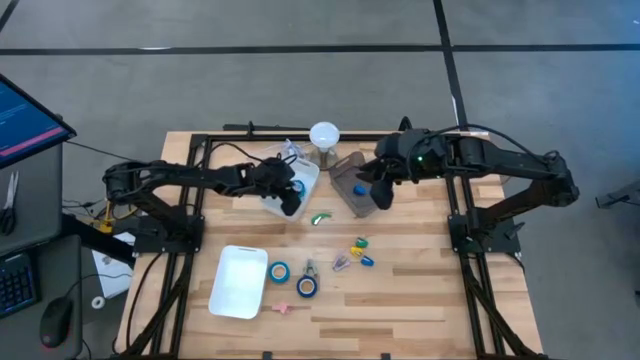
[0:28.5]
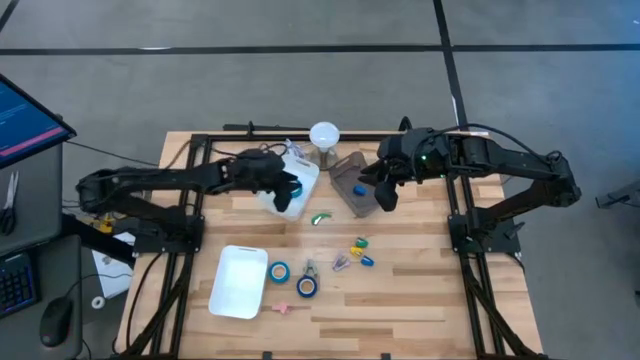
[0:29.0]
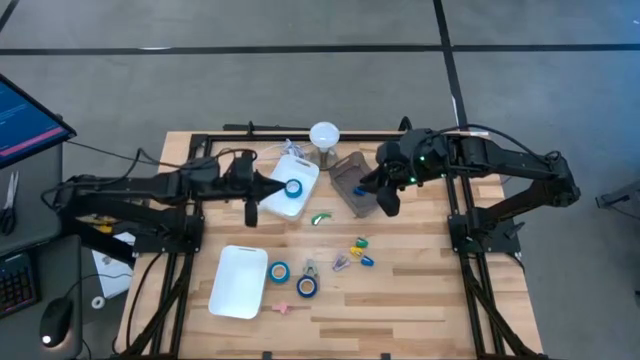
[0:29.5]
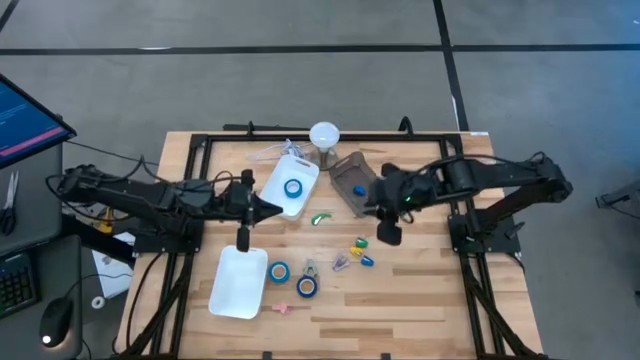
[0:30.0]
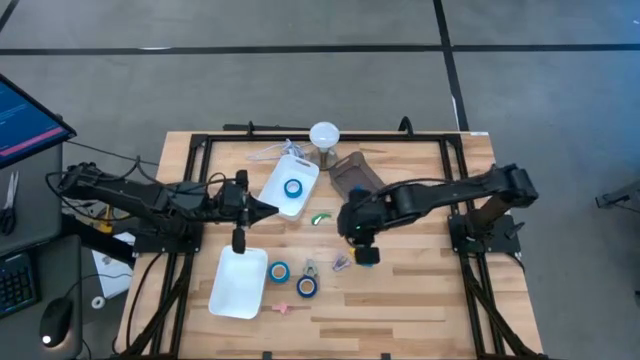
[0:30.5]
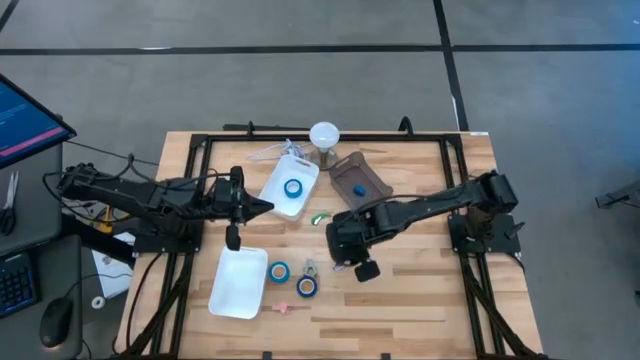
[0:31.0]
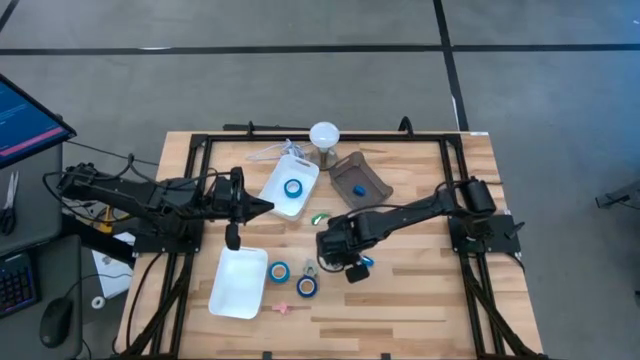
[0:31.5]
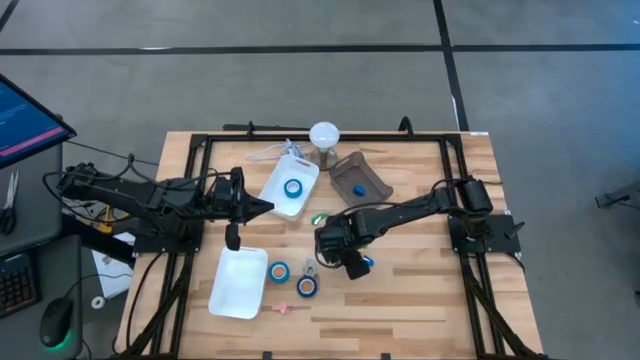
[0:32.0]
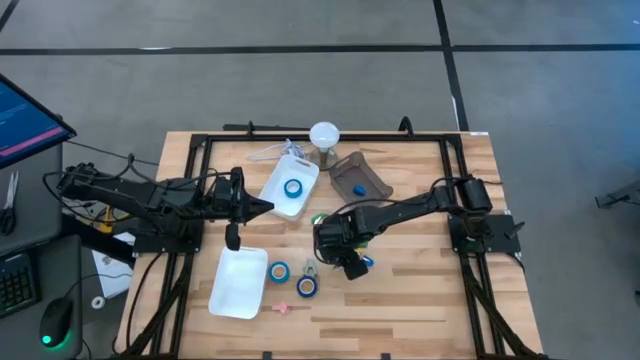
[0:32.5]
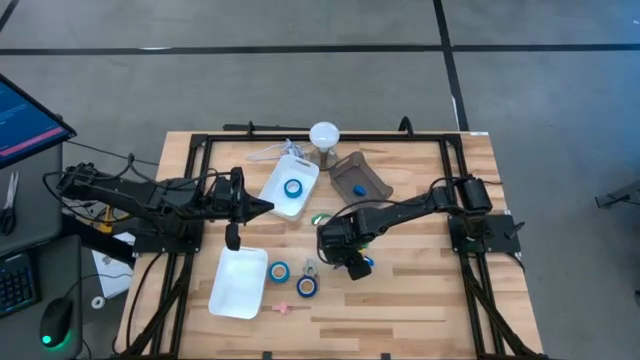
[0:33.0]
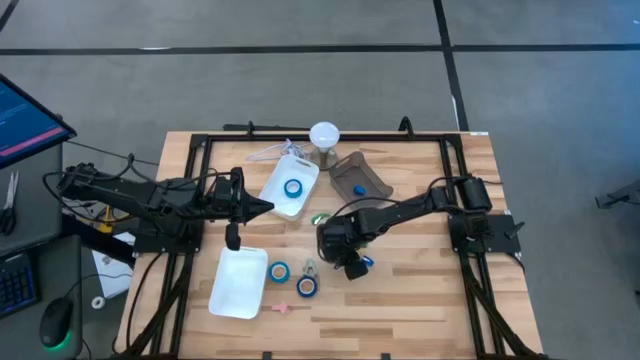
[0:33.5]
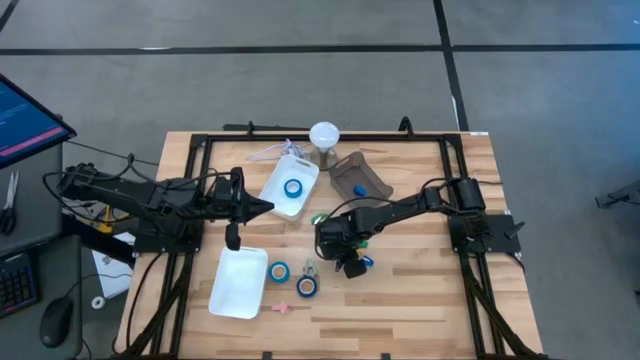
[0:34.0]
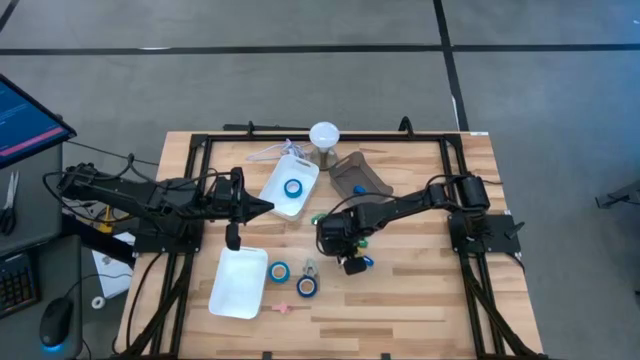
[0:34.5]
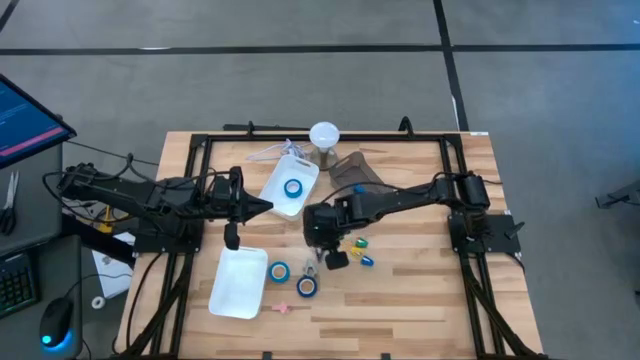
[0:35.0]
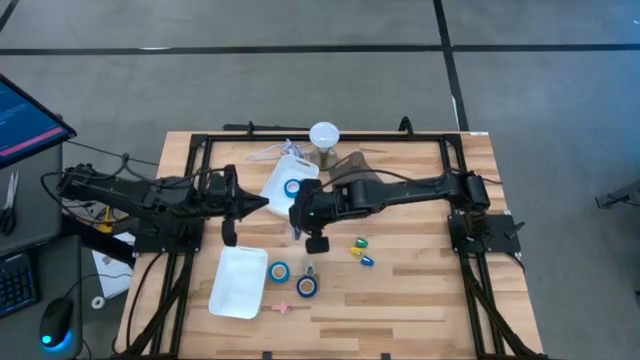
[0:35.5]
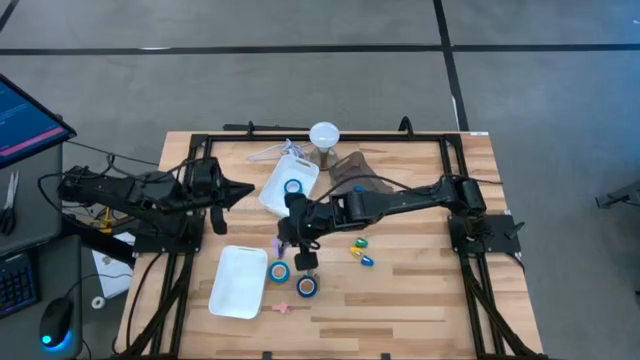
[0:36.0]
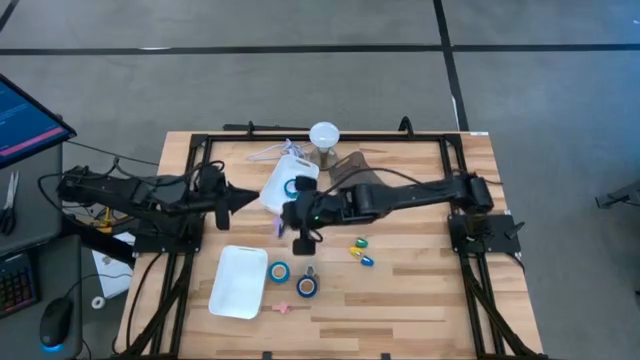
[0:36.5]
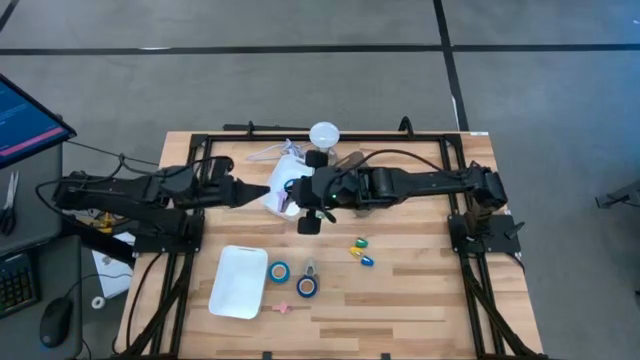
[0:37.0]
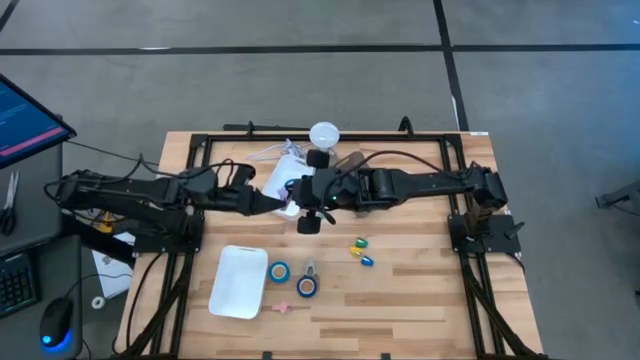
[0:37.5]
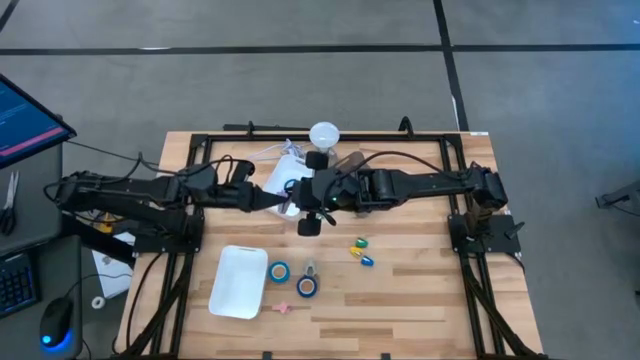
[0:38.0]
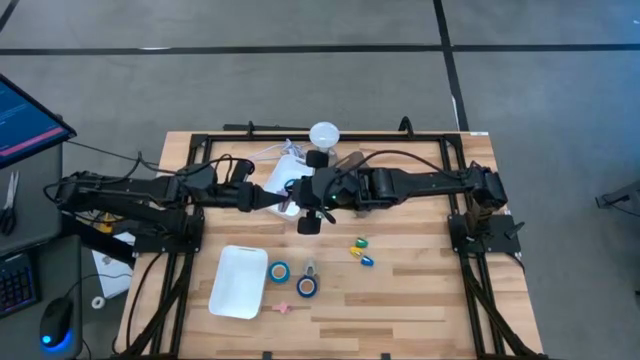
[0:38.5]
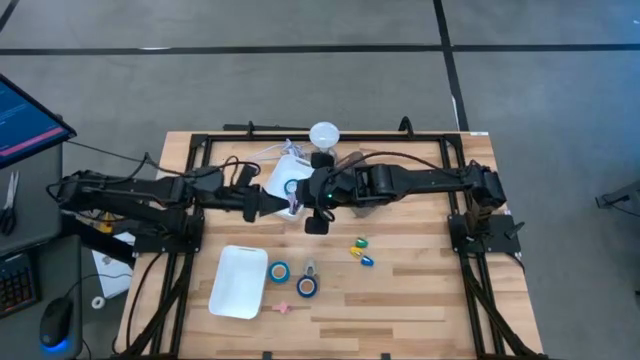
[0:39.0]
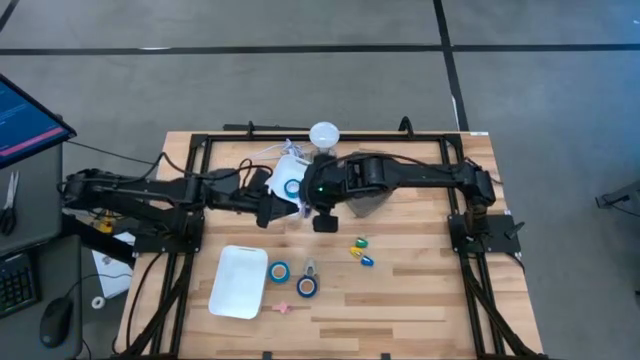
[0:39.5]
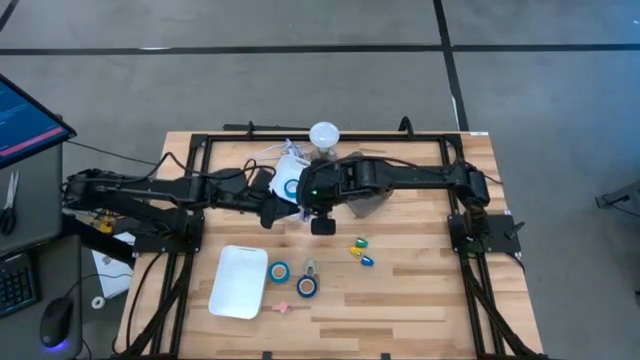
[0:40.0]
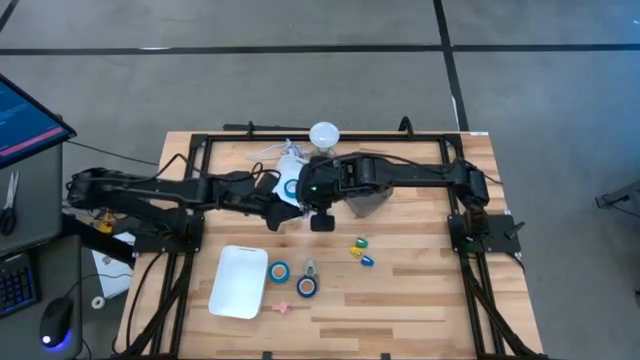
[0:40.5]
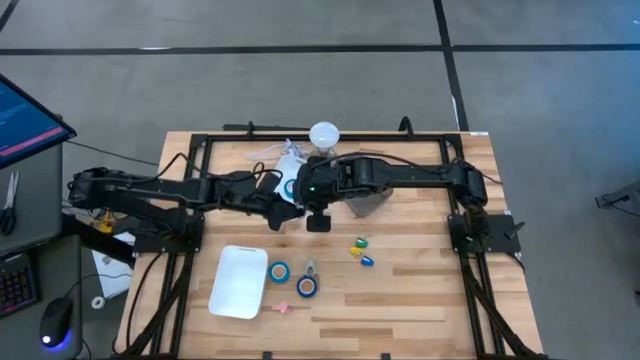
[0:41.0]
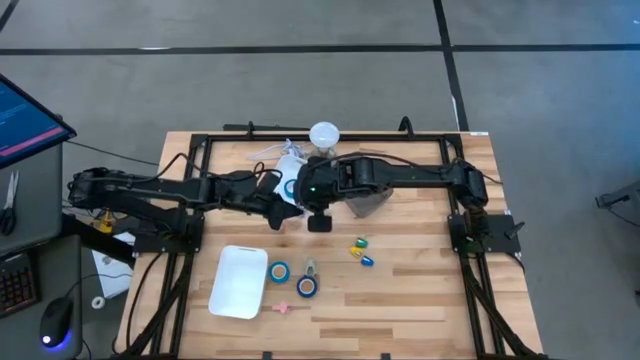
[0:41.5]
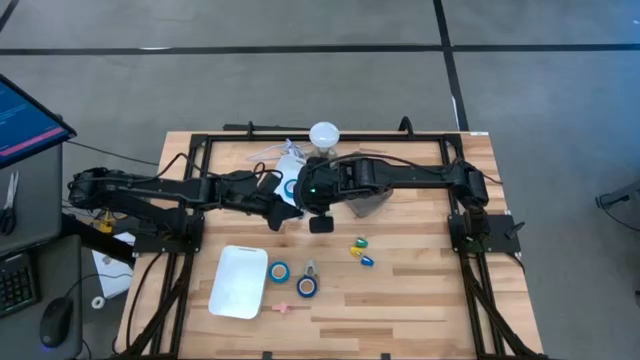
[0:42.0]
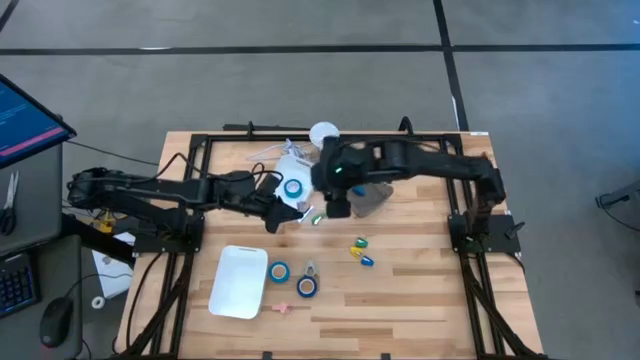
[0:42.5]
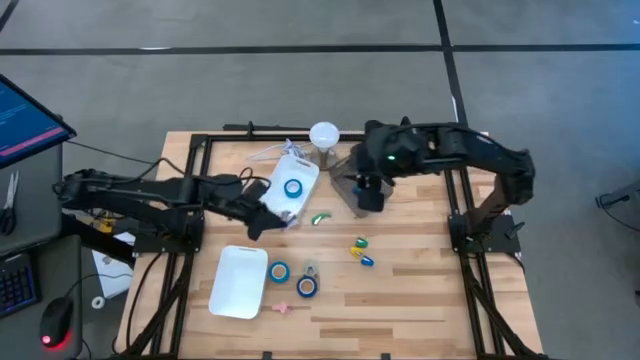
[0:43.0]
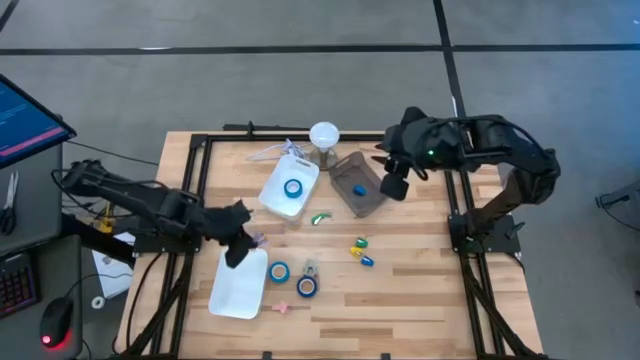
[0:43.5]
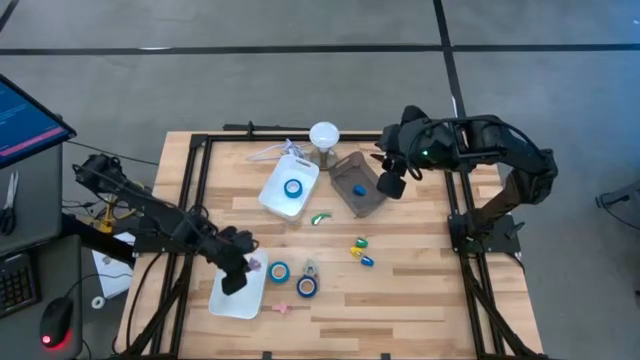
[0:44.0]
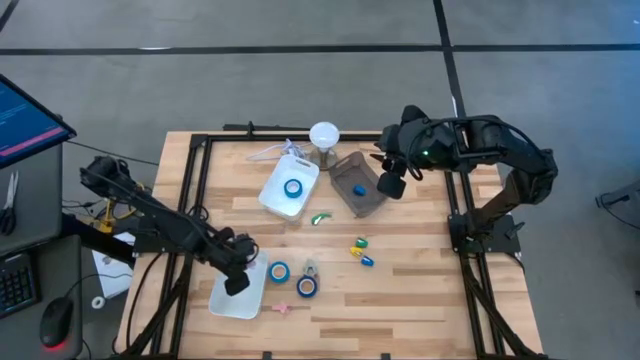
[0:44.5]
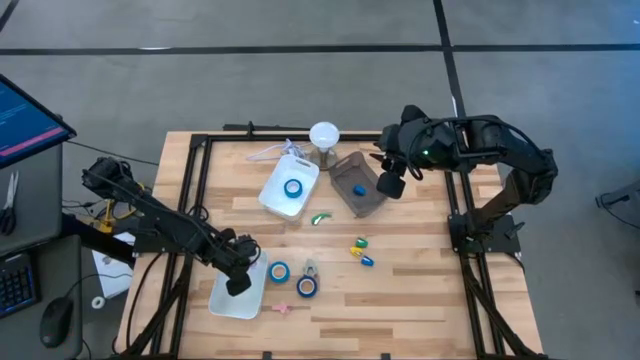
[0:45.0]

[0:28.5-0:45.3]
Task: Pick and place Stapler, Stapler remover, tape
Put the purple staple remover into the bottom white bin

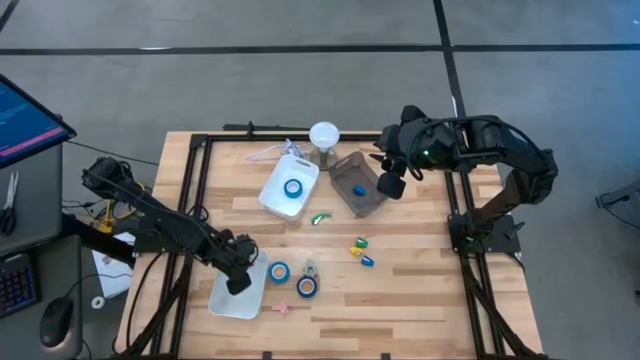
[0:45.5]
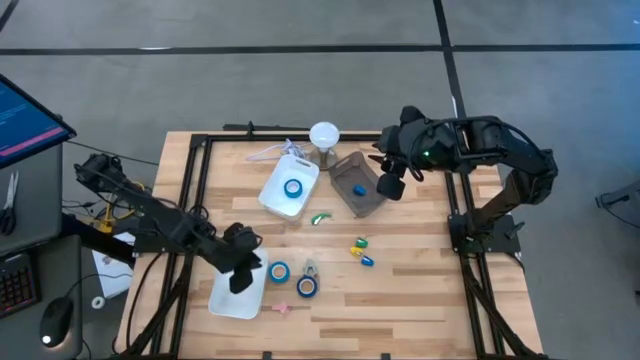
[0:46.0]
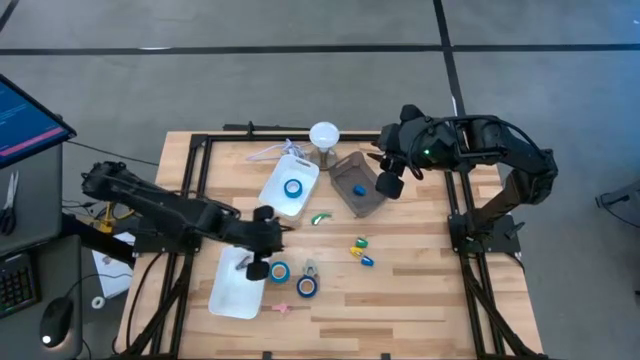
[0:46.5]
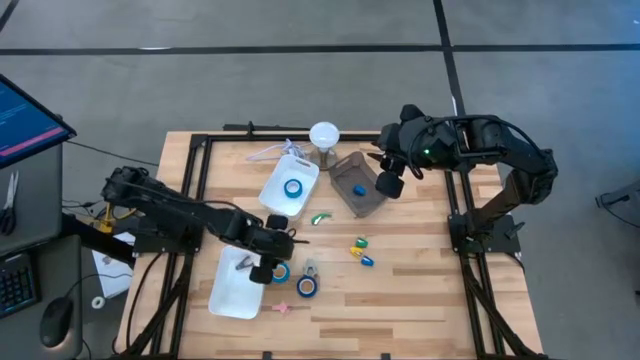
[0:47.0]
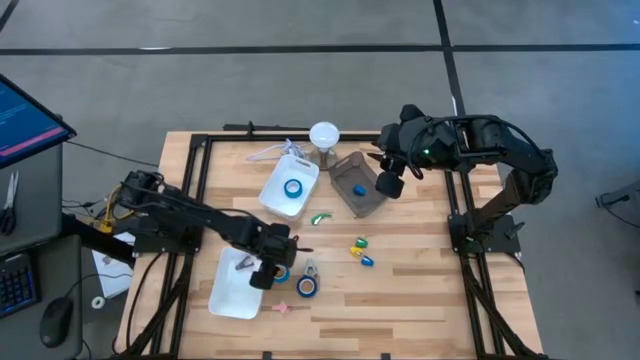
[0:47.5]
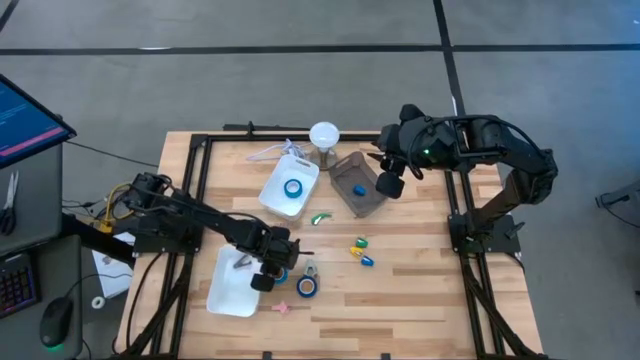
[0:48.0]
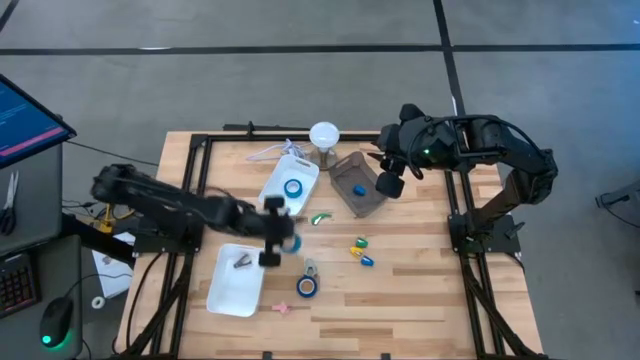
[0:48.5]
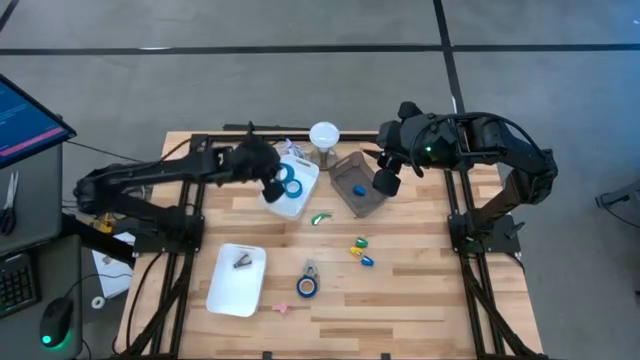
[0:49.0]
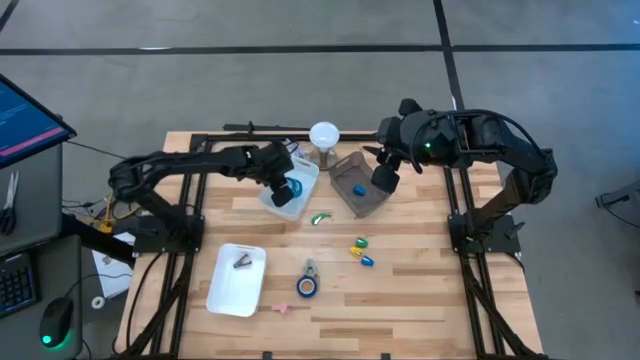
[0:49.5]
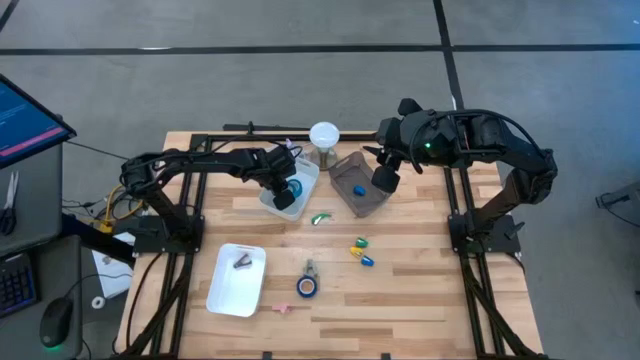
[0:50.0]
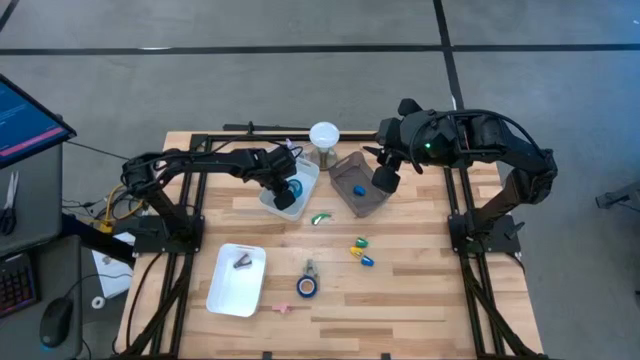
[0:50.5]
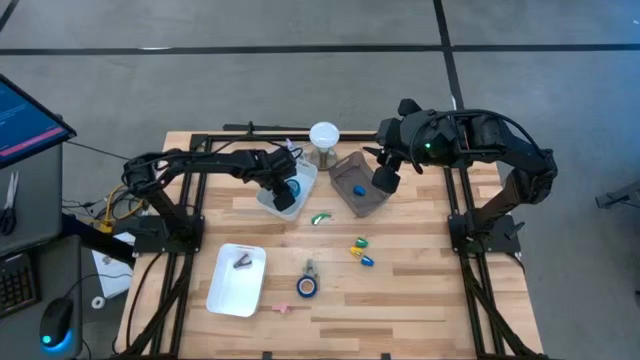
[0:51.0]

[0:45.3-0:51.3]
Put the blue tape into the top white bin
